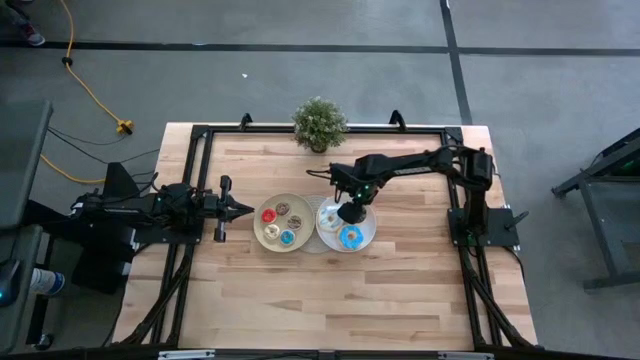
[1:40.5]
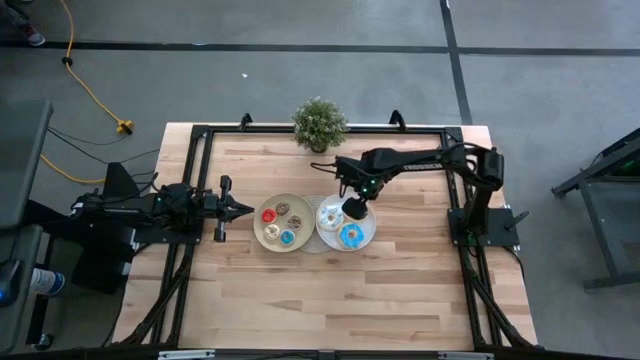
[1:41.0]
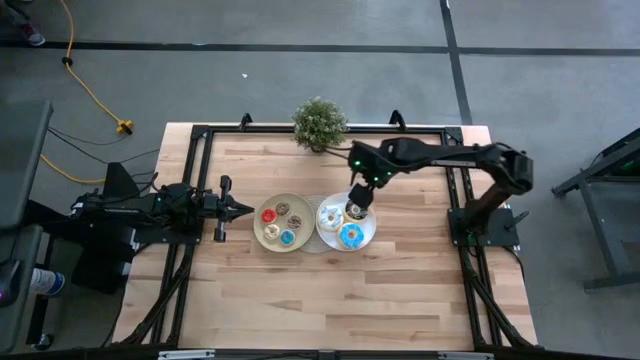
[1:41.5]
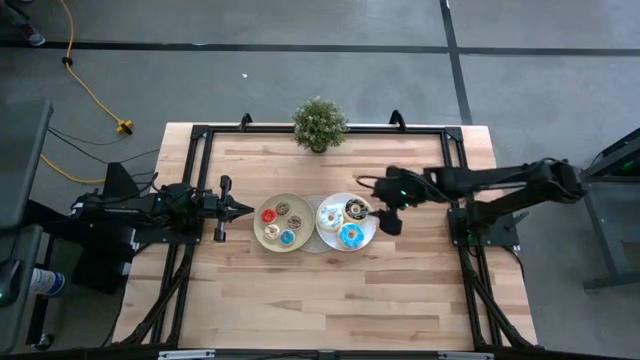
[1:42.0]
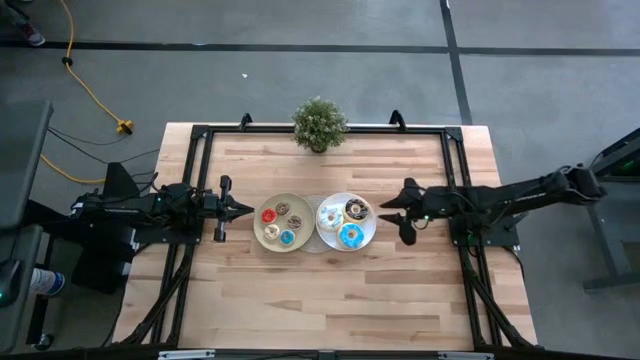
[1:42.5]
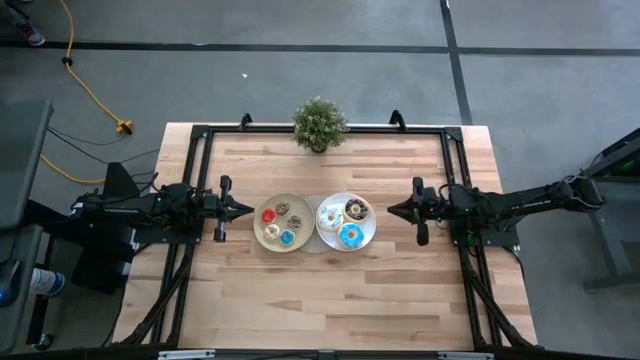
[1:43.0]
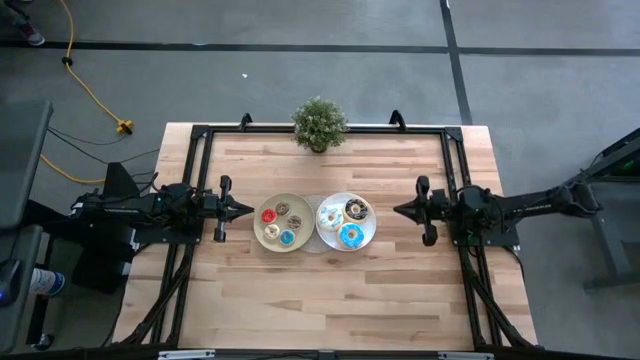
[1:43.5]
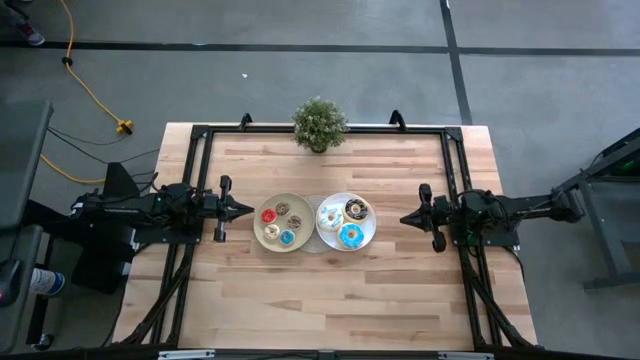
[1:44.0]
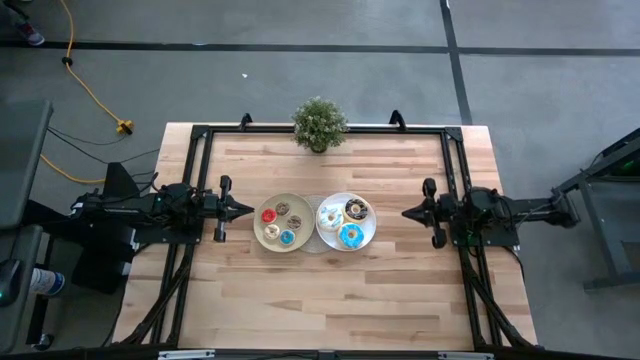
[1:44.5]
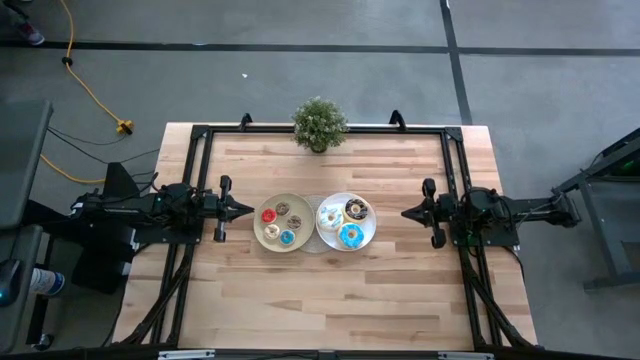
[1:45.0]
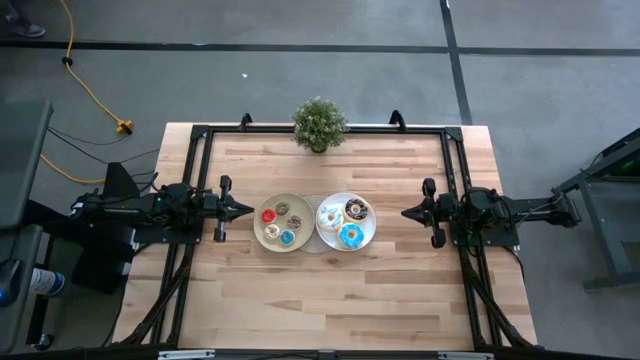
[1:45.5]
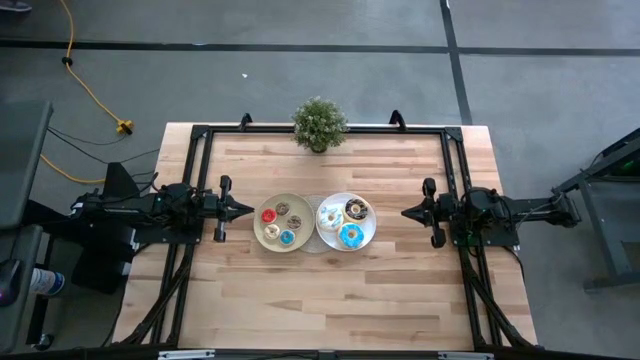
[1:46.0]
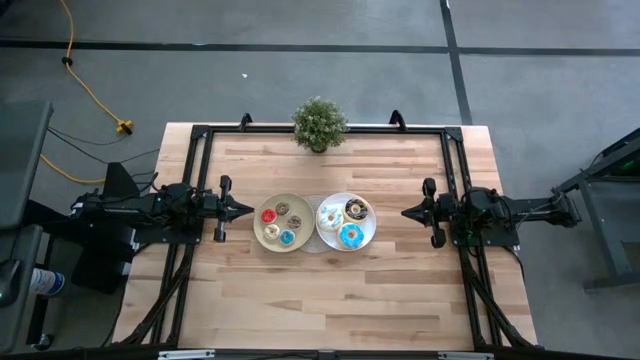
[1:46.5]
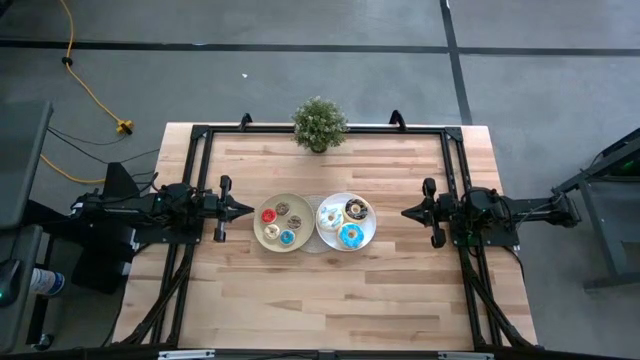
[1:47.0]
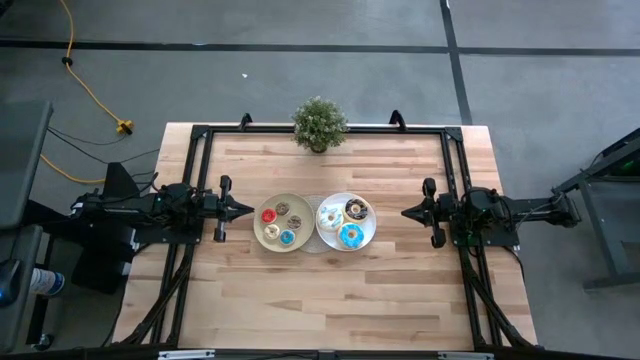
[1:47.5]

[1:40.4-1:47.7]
Task: Pick & Place donuts
Return to Home Position

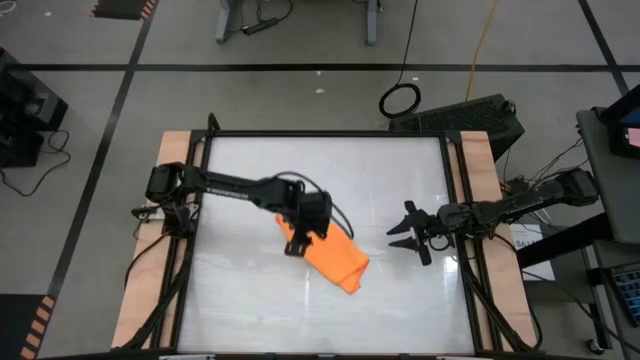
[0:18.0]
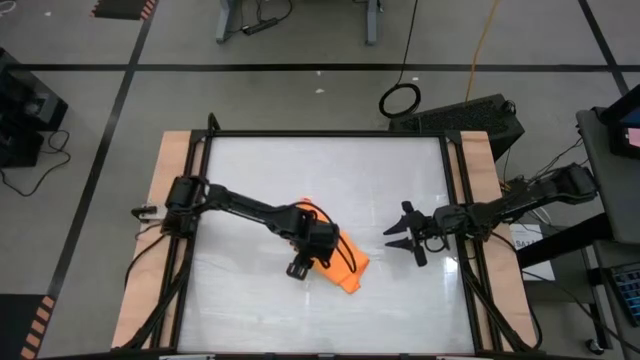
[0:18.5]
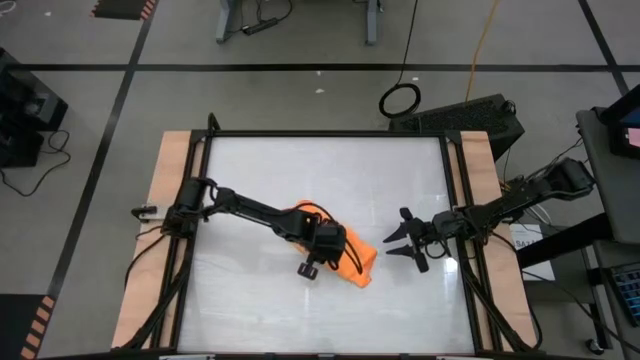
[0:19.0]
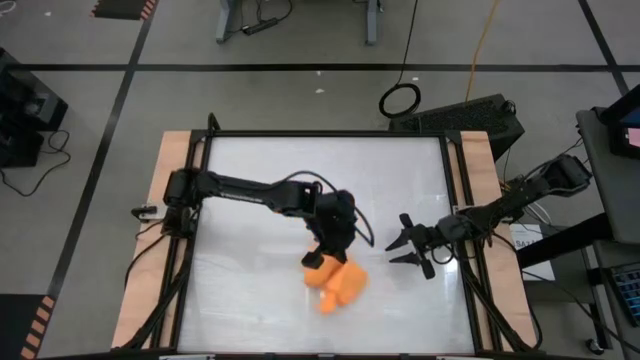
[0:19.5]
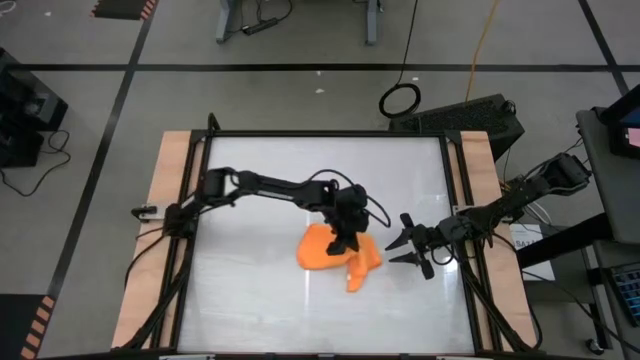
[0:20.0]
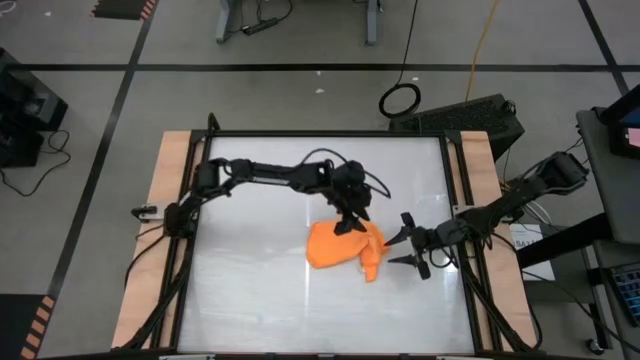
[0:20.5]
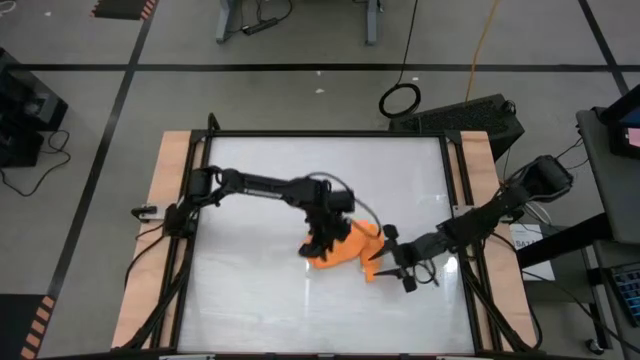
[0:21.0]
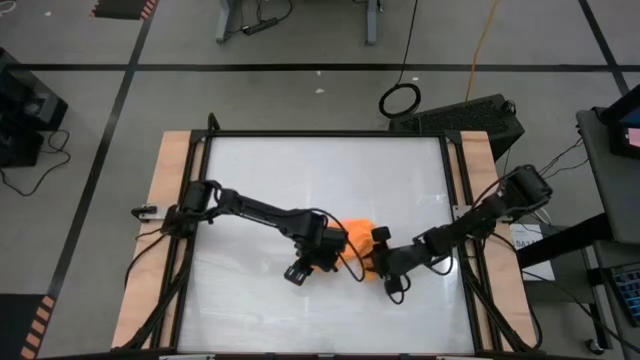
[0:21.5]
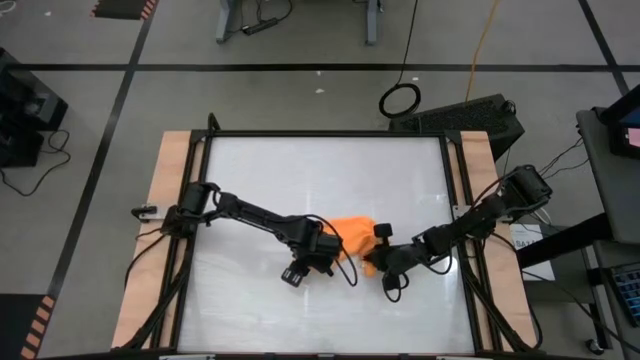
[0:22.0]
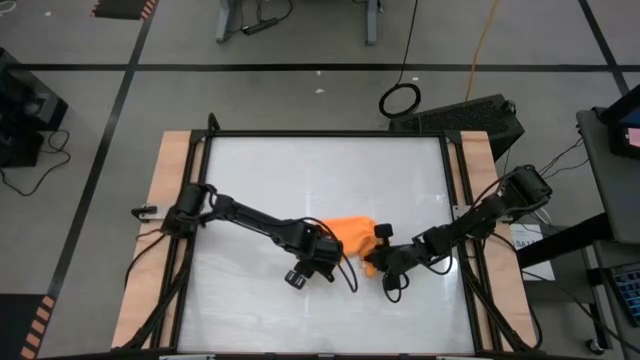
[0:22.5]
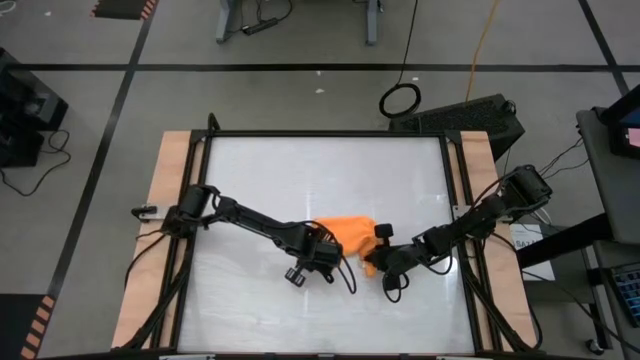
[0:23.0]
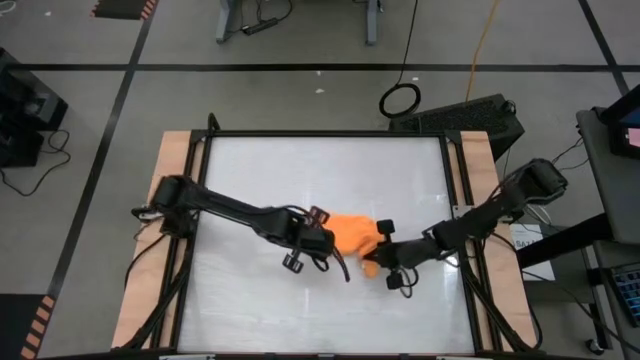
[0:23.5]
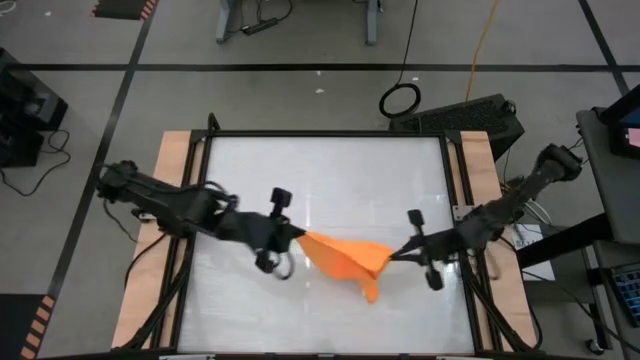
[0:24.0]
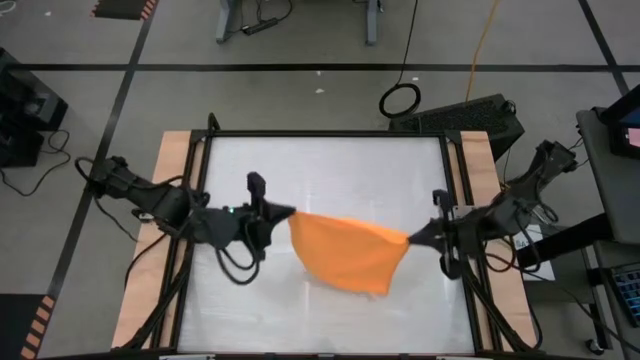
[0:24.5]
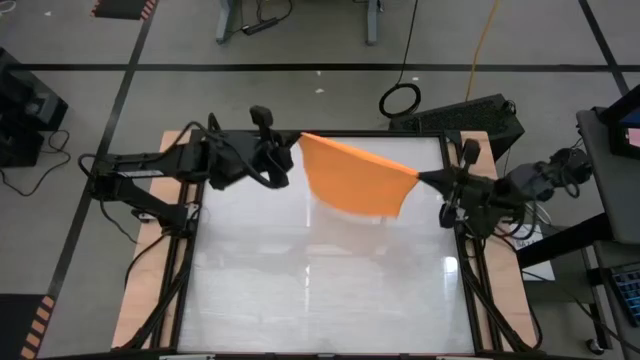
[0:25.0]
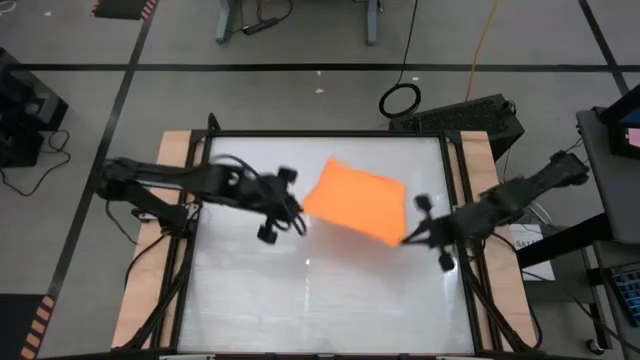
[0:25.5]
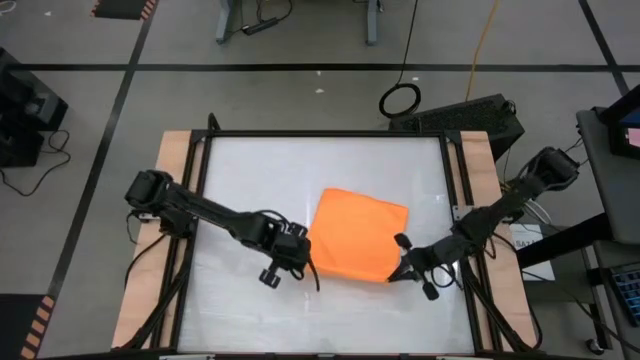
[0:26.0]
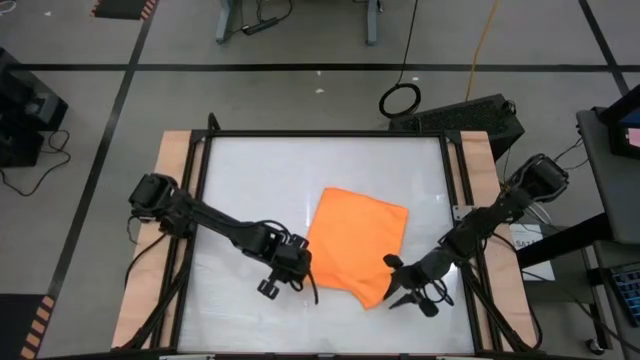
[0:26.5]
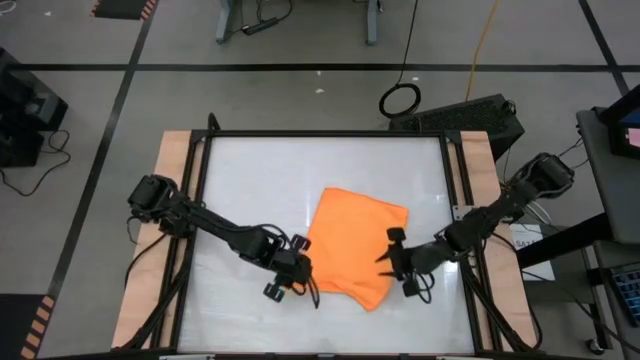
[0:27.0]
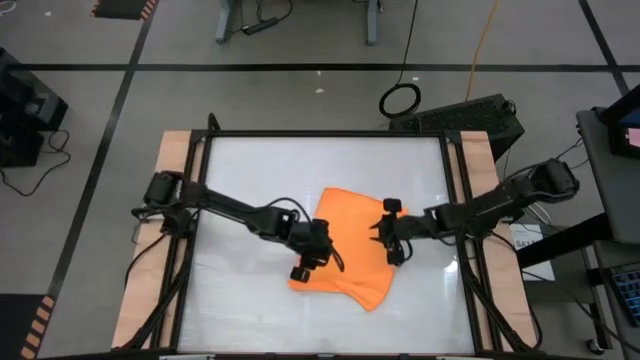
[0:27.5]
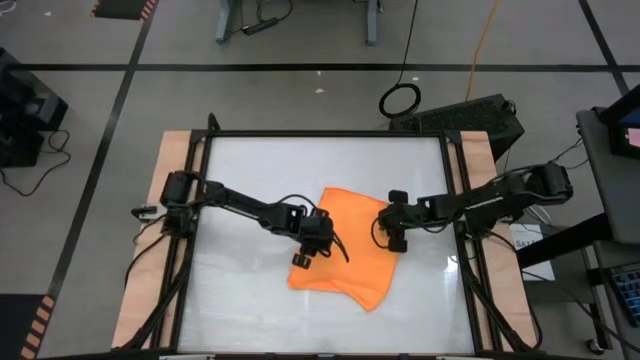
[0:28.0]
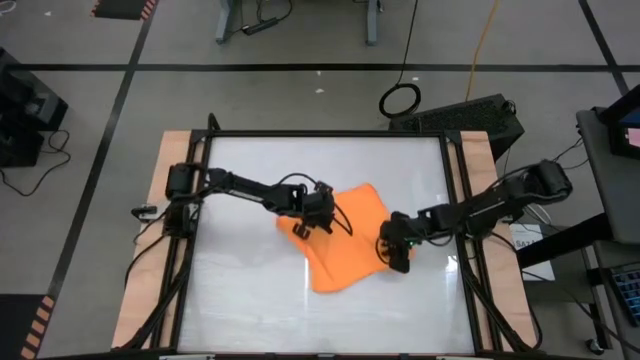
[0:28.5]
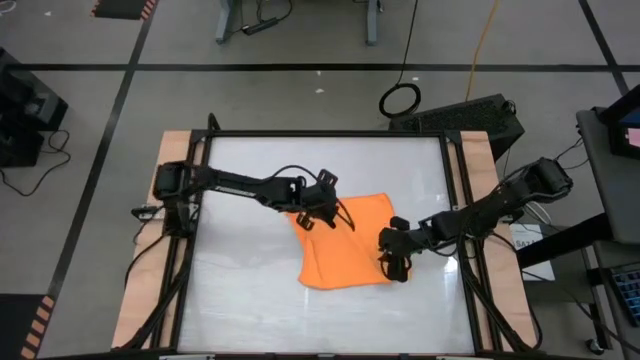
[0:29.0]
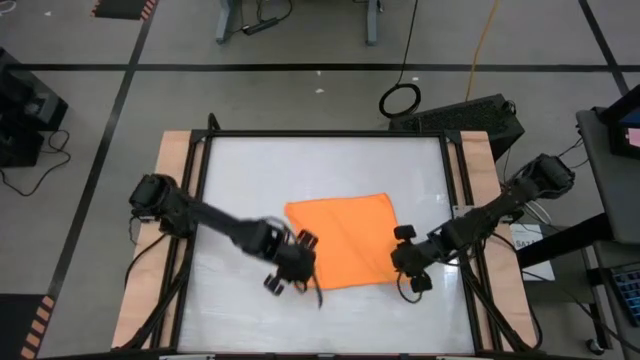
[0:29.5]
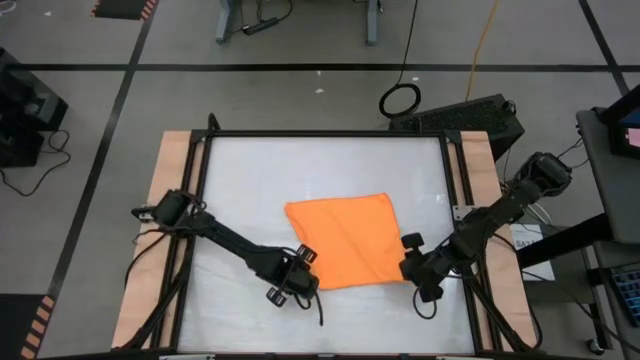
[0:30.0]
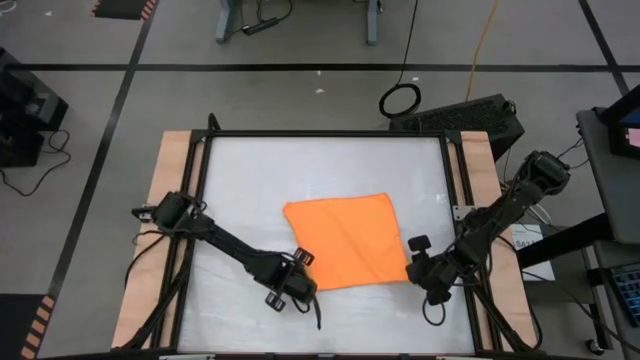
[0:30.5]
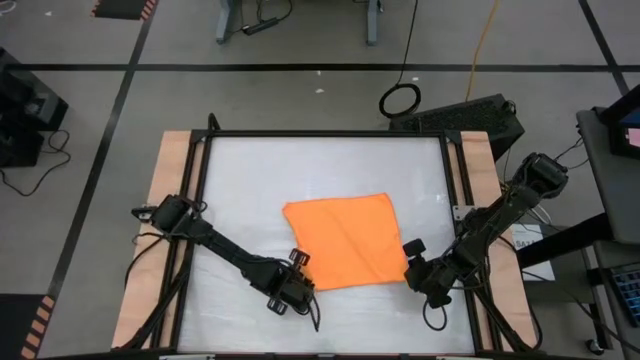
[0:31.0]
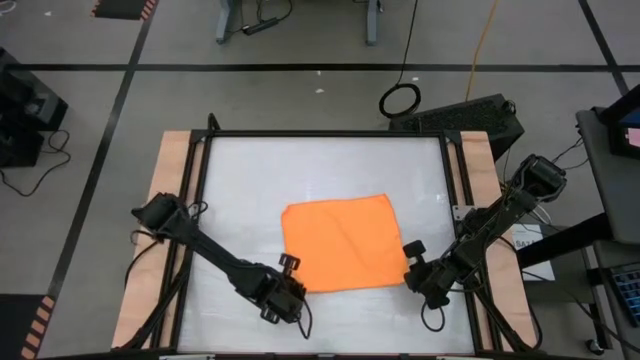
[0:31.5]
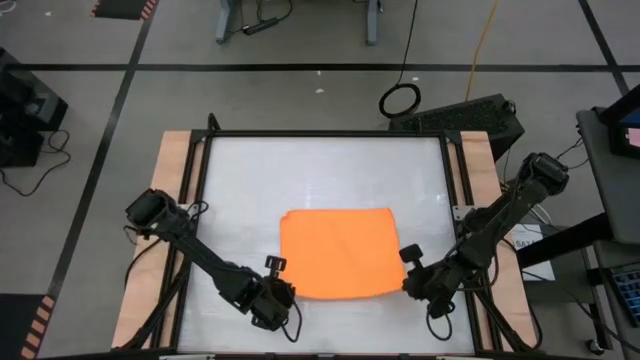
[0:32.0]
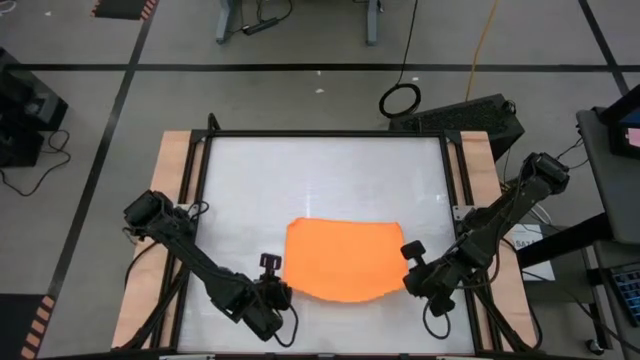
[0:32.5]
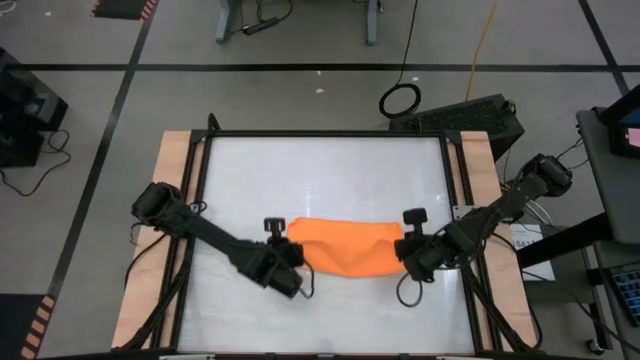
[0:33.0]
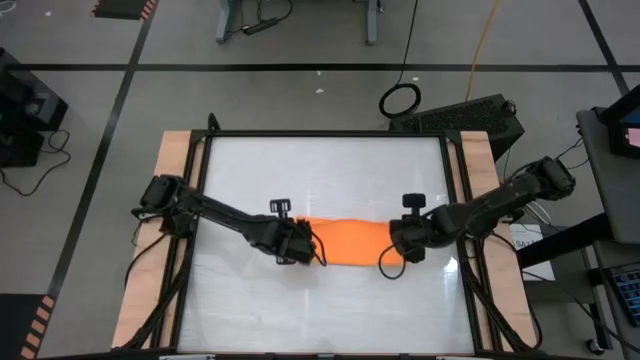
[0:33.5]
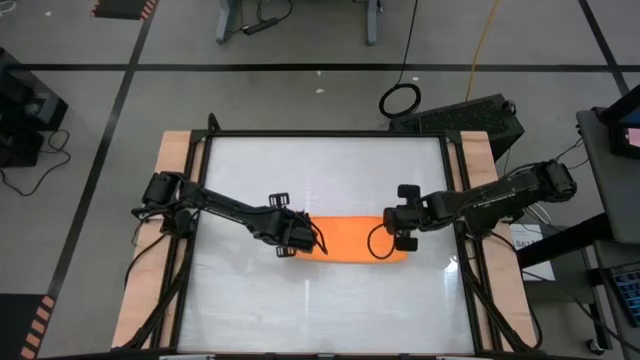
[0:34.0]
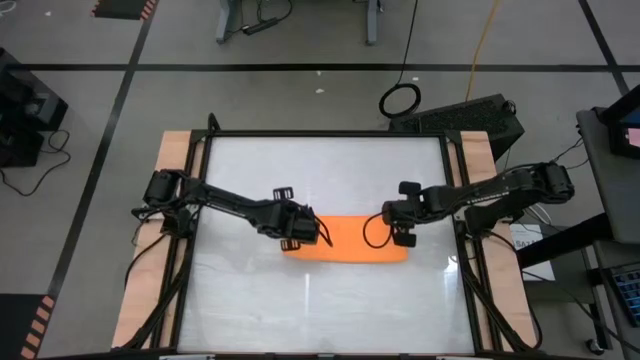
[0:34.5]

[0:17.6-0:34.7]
Task: Roll towel
Fold the orange microfiber cloth
